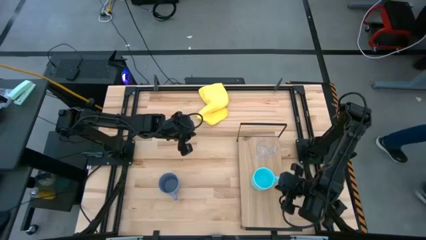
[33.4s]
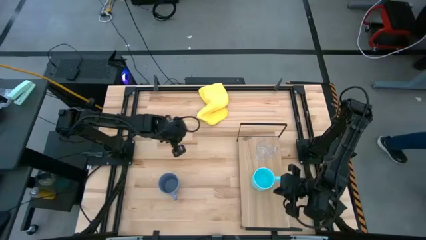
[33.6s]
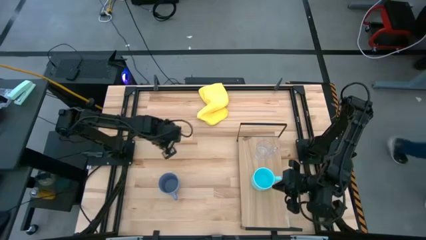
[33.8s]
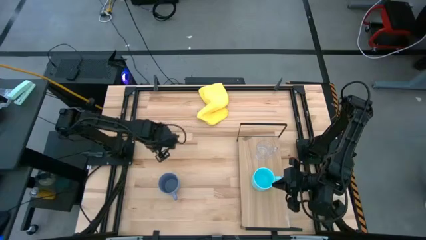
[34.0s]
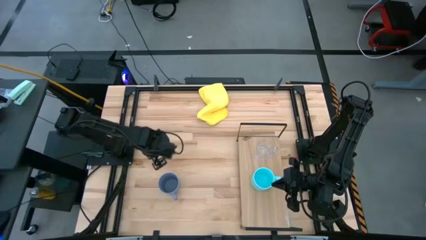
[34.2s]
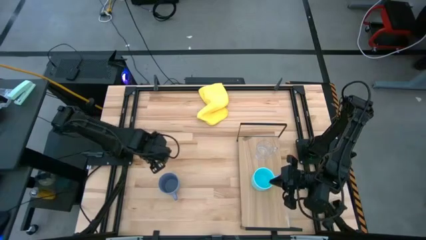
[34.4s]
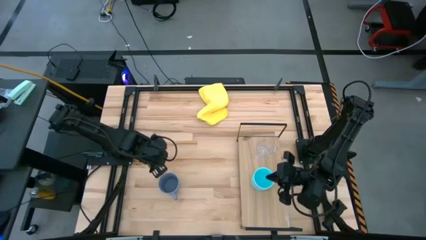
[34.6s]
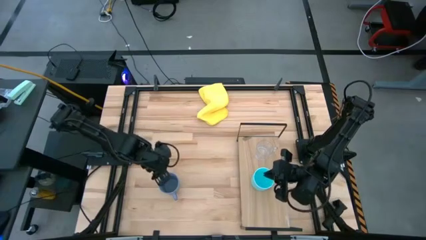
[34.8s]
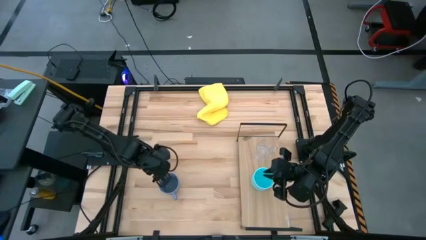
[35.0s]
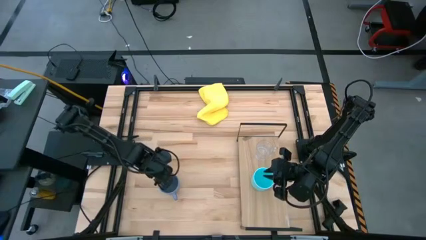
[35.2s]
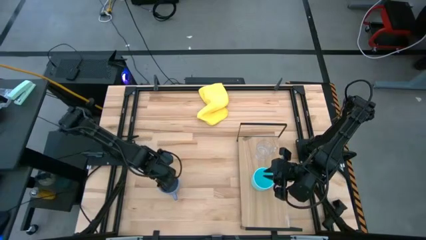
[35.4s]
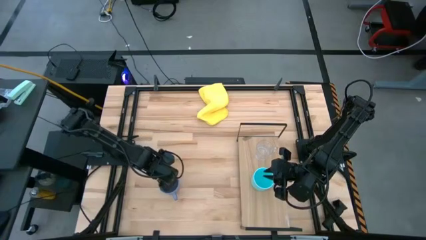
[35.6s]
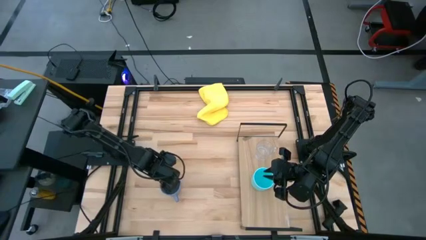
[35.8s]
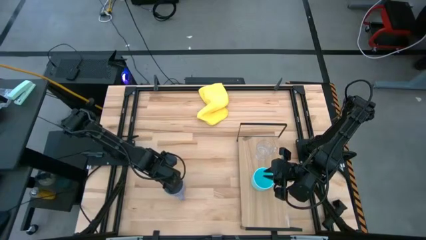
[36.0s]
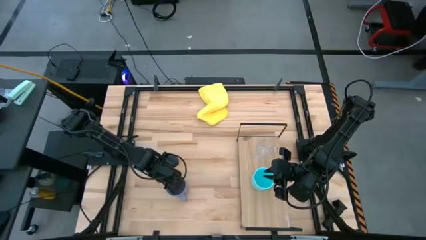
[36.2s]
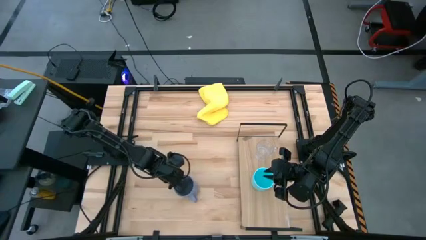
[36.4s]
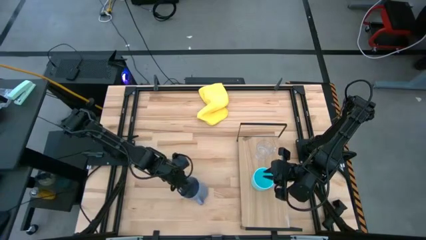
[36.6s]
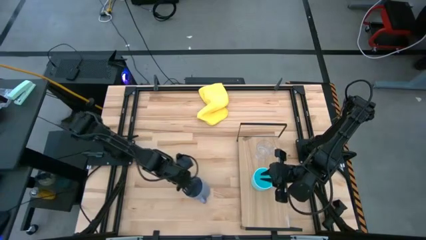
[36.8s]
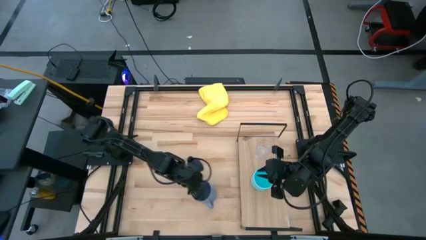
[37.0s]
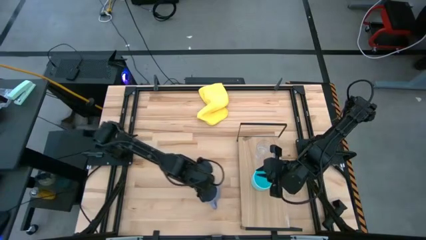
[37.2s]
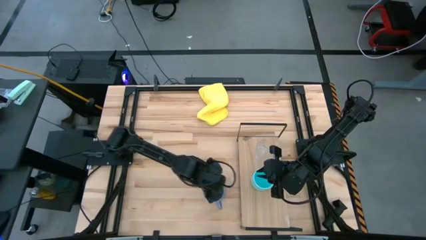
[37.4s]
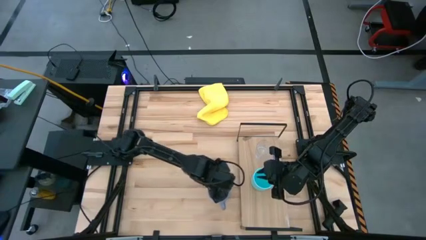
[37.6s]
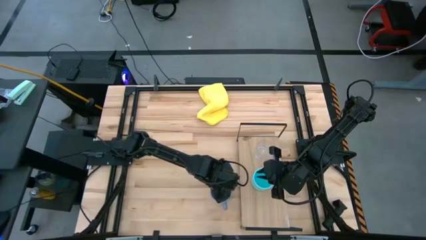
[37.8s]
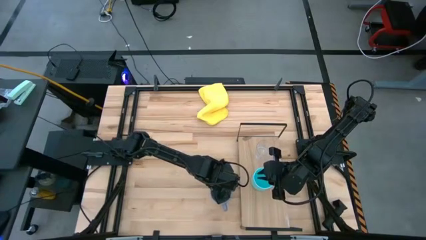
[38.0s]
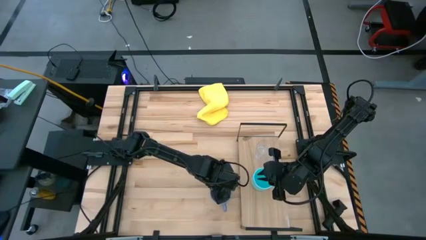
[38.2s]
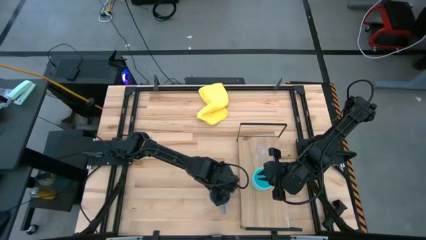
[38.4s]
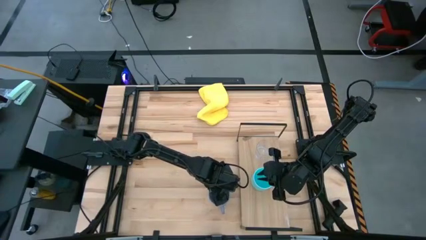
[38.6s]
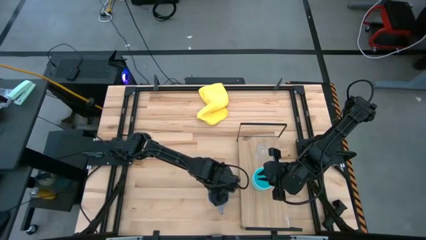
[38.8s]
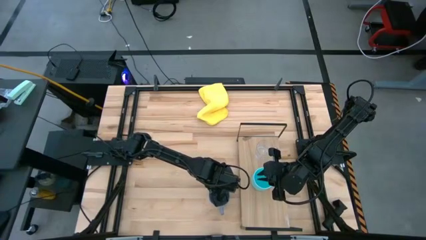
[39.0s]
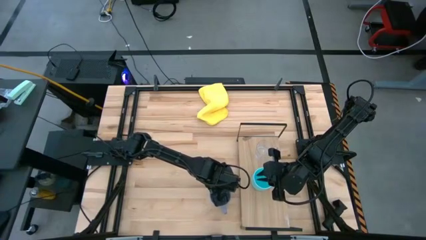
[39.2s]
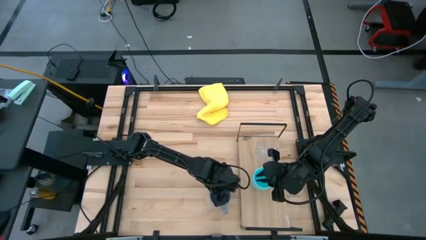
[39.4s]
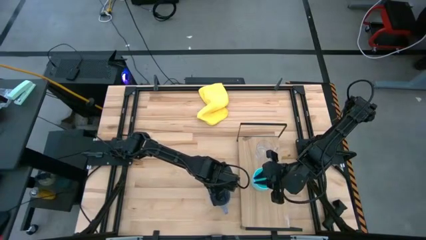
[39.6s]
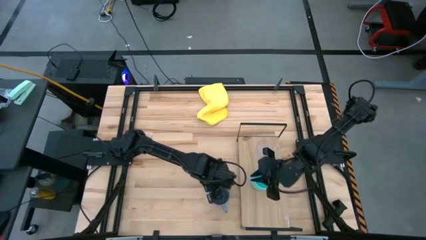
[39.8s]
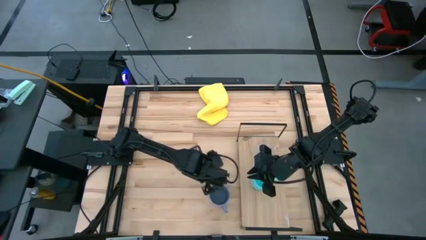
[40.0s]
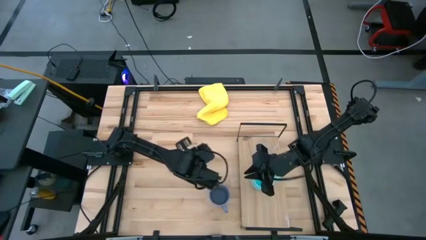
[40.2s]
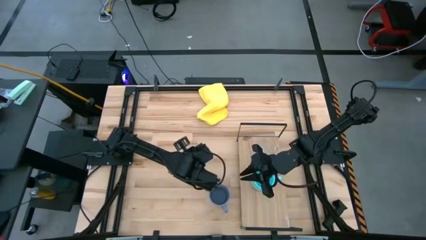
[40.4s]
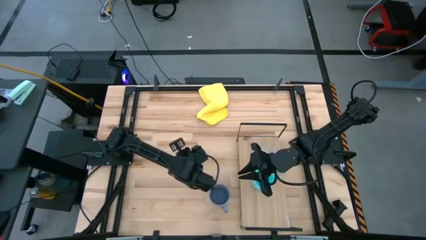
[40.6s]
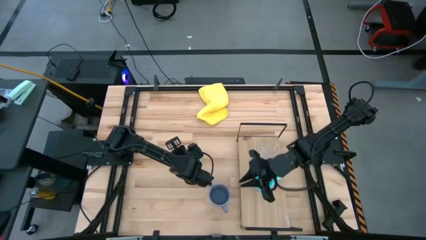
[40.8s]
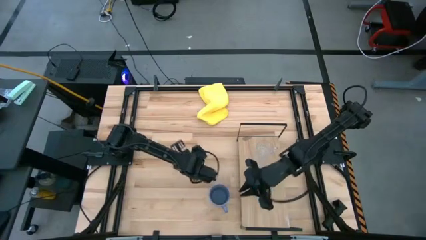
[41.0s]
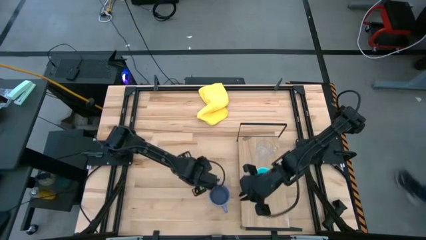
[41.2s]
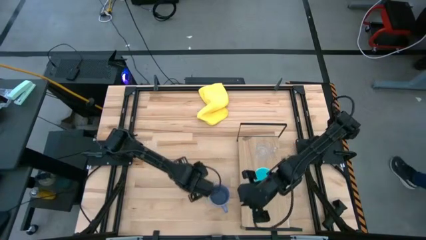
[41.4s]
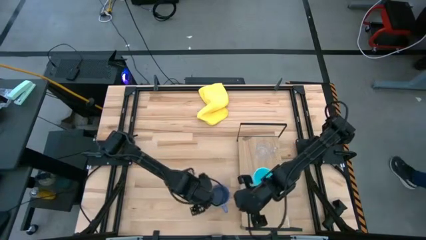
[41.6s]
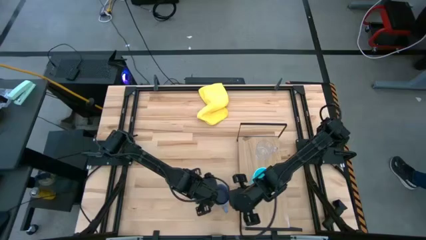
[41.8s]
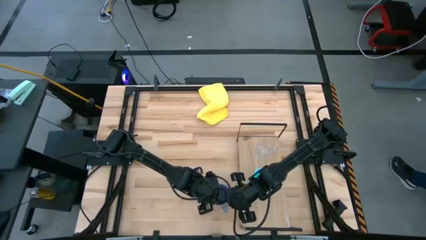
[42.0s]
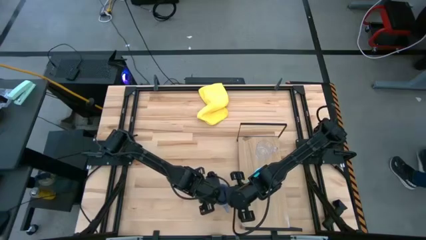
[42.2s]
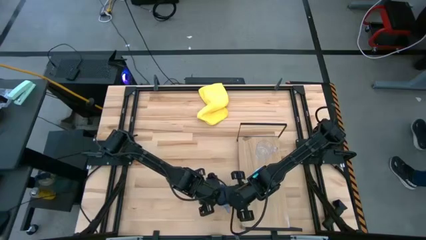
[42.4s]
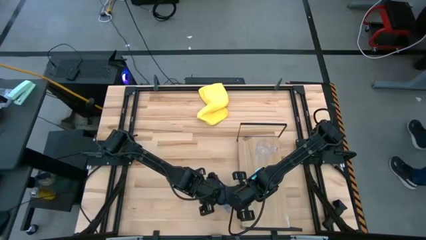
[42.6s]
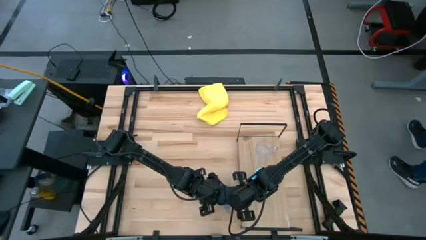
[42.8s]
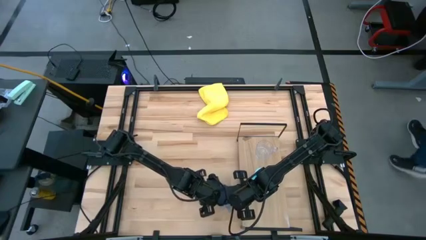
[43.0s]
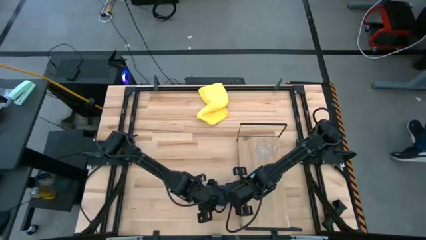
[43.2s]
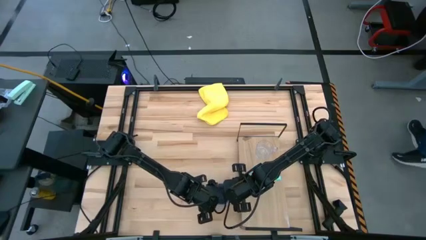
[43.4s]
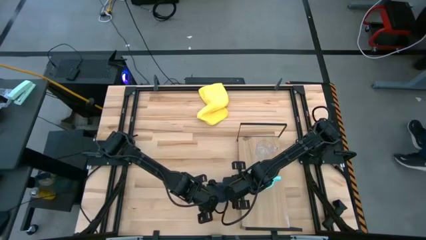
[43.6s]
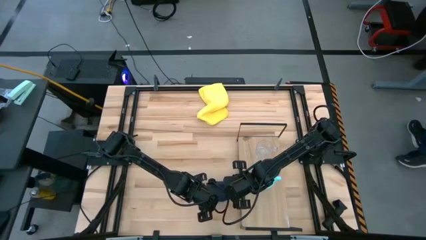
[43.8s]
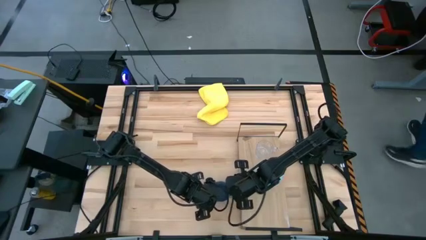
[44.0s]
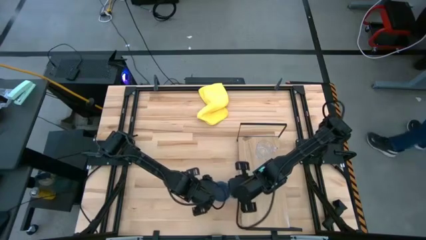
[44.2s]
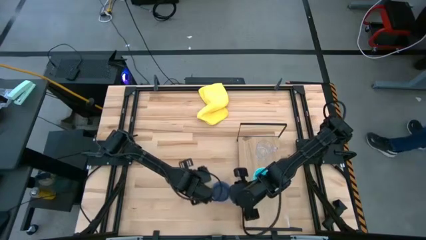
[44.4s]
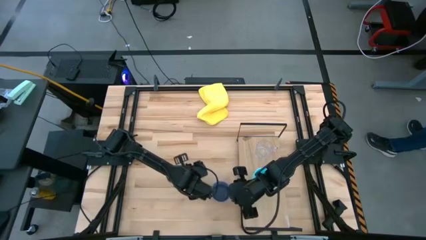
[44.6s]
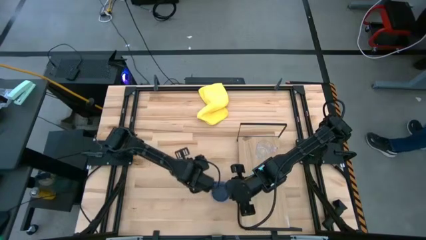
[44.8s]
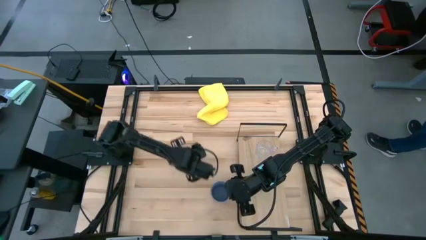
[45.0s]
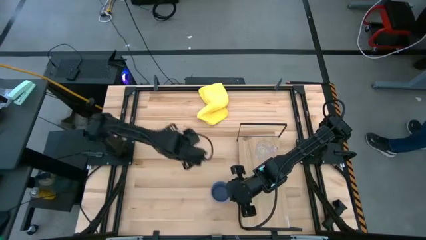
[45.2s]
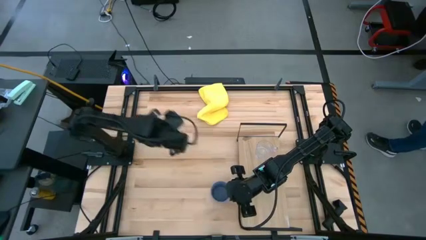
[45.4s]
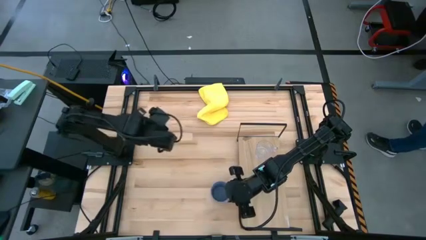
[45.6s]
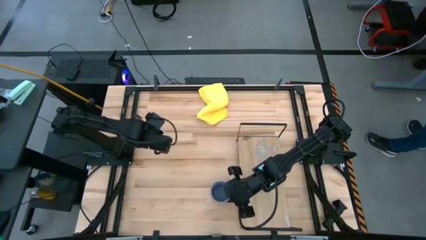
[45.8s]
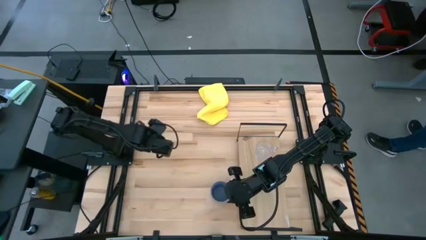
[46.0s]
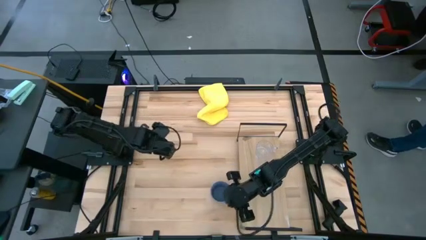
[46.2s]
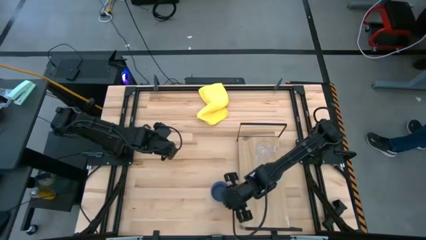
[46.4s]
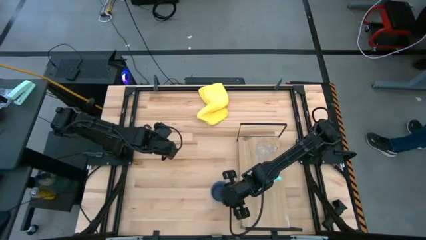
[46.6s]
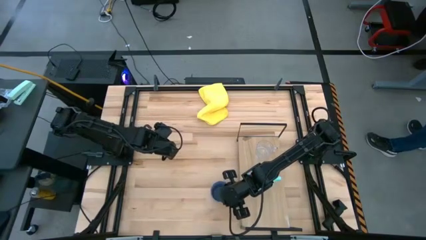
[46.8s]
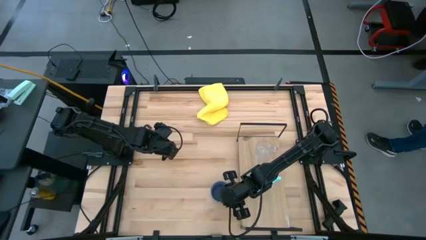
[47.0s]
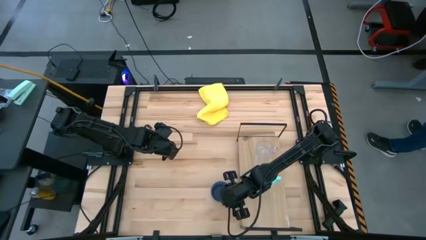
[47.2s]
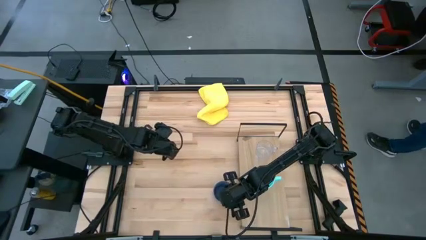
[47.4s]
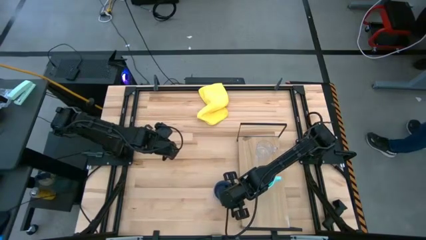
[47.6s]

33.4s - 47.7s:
Task: Stack small to large cups/mugs on shelf
Put the purple mug on the shelf
